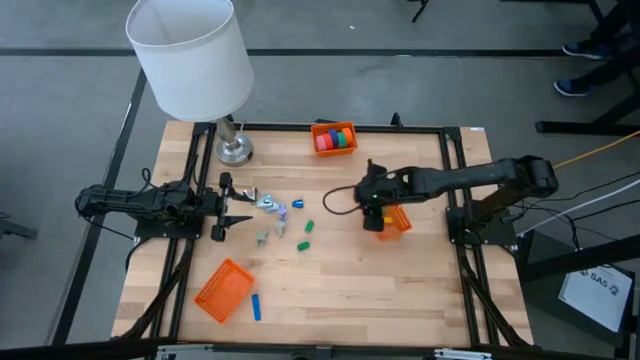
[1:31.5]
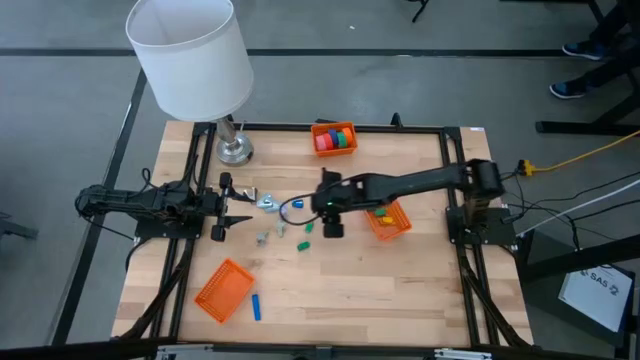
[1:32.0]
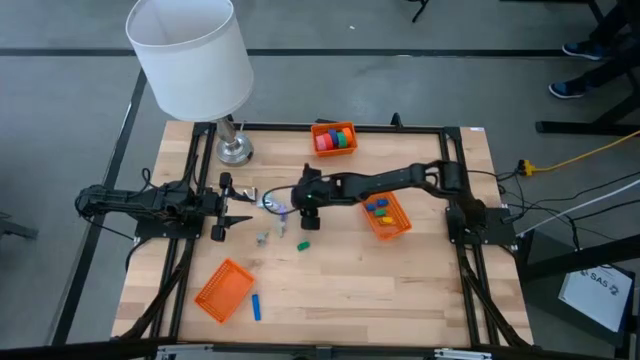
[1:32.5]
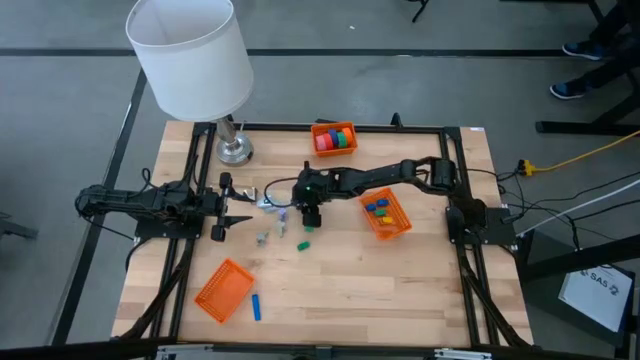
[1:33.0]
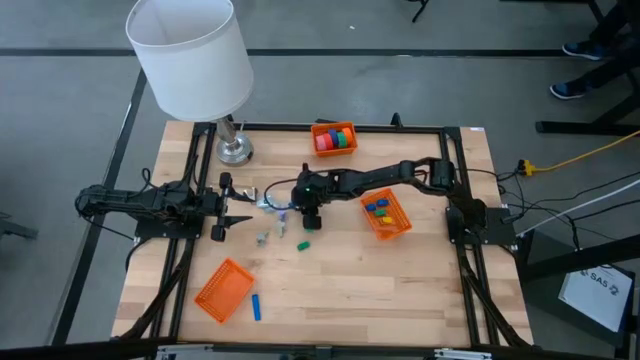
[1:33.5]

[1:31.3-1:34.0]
Task: Pick and place Stapler, Stapler remover, tape
Put the blue stapler into the middle orange bin

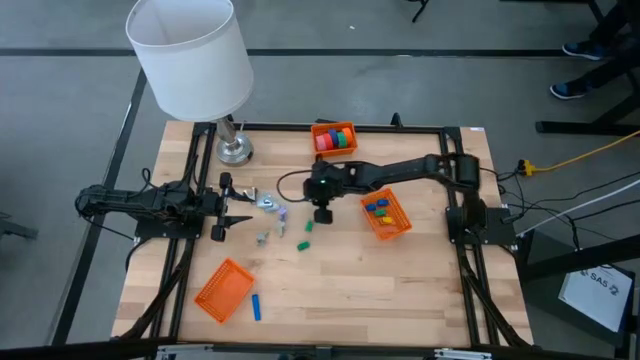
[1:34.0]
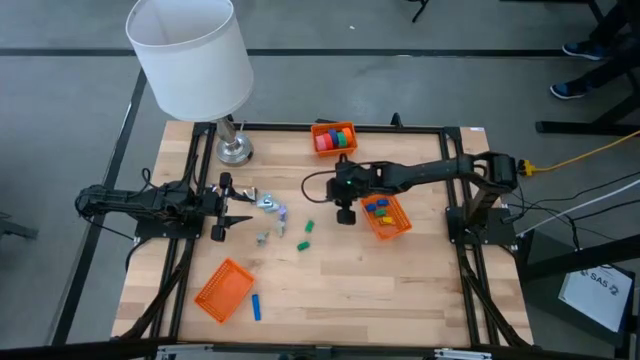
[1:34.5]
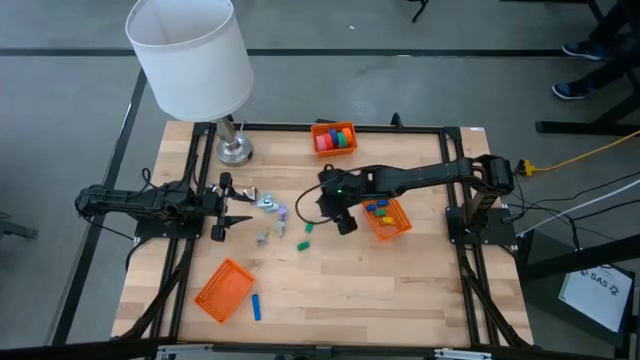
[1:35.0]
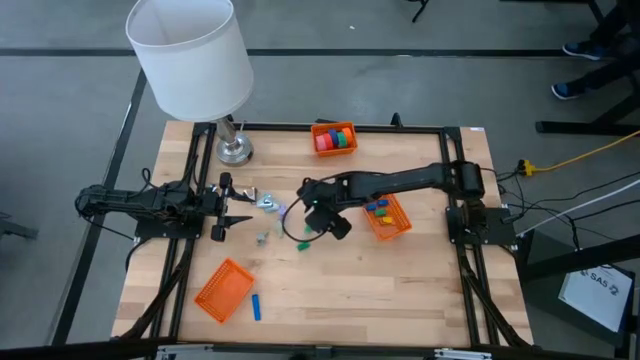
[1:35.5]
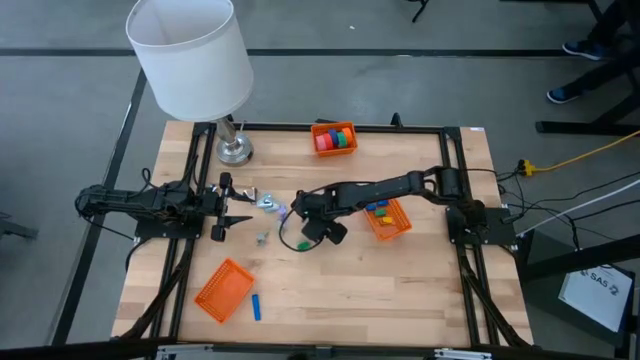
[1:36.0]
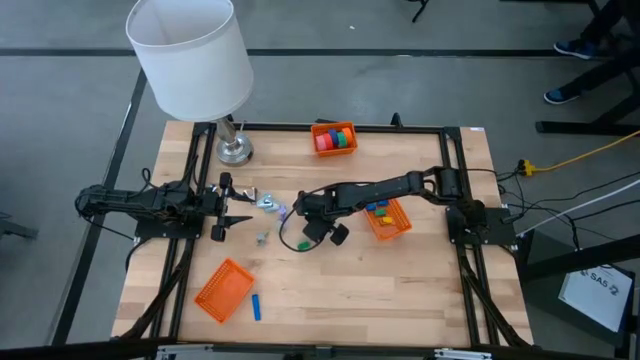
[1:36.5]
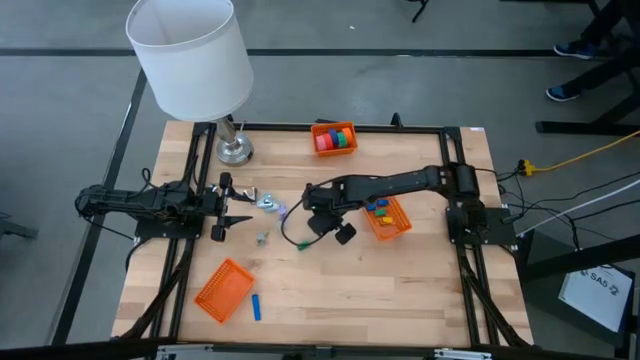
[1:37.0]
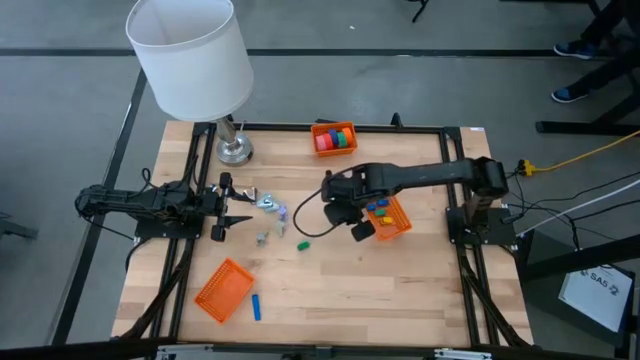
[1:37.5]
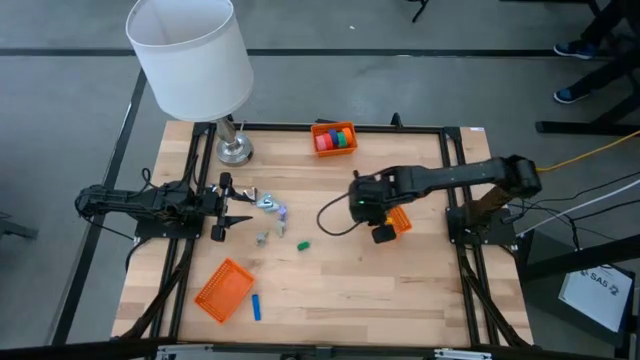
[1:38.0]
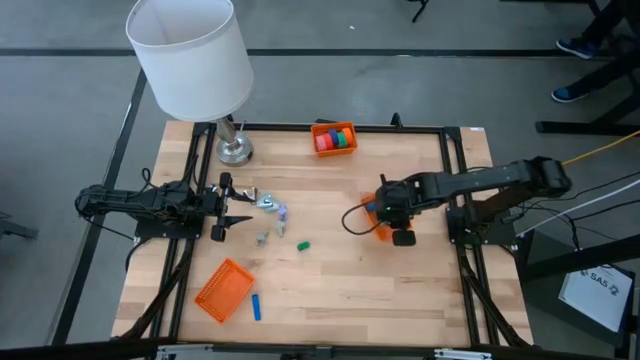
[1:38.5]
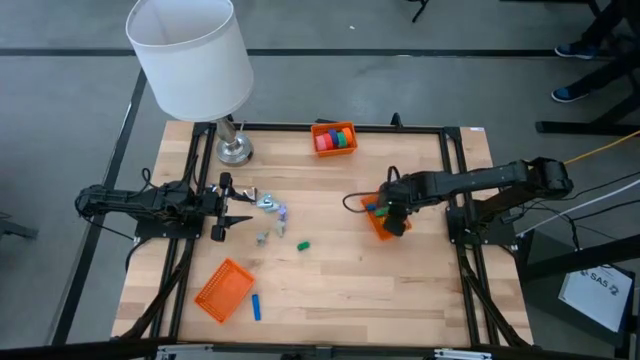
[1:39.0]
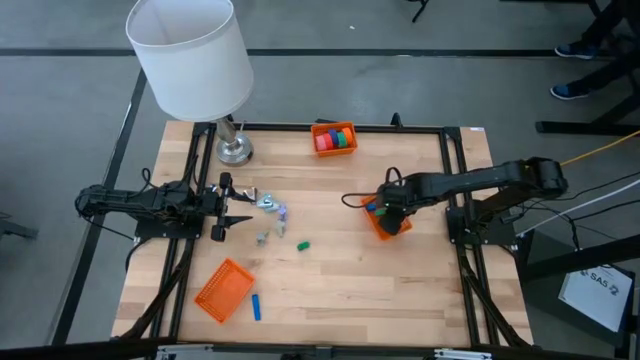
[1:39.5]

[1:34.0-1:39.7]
Put the green stapler into the middle orange bin

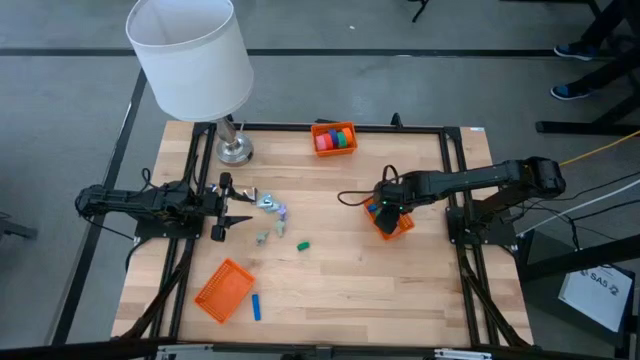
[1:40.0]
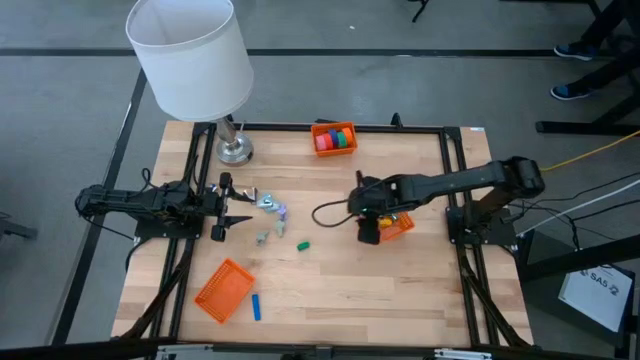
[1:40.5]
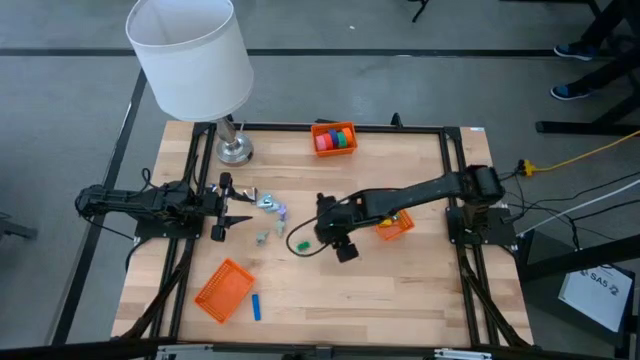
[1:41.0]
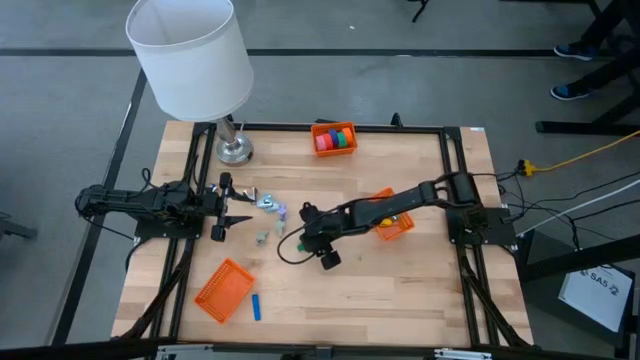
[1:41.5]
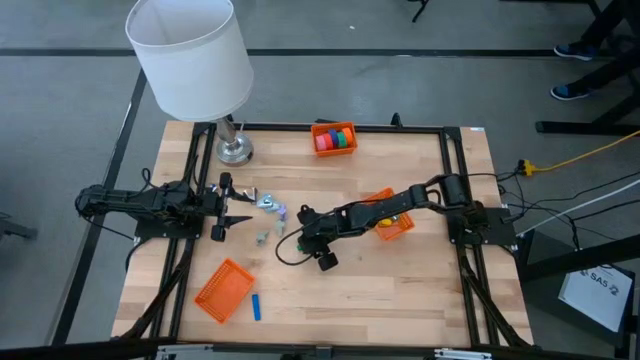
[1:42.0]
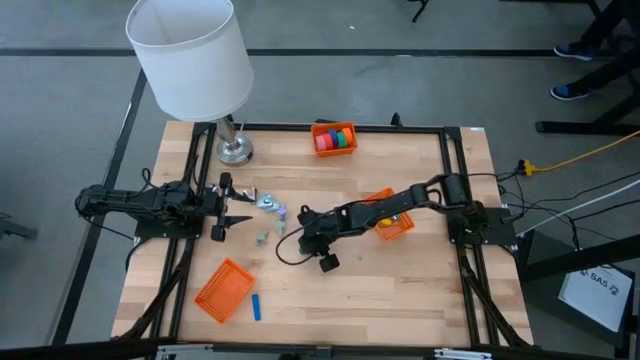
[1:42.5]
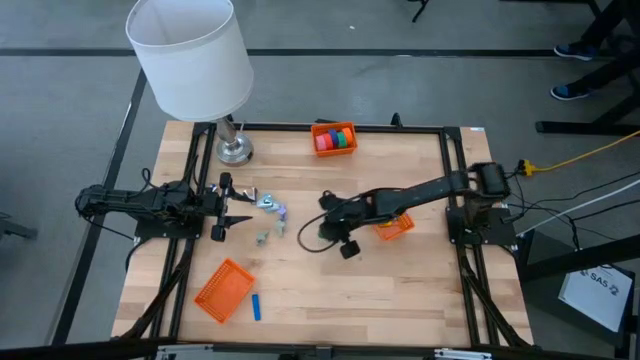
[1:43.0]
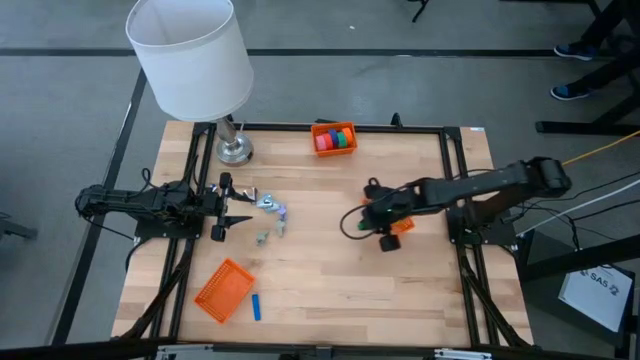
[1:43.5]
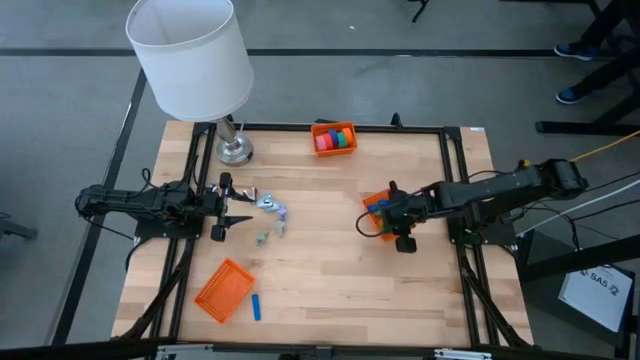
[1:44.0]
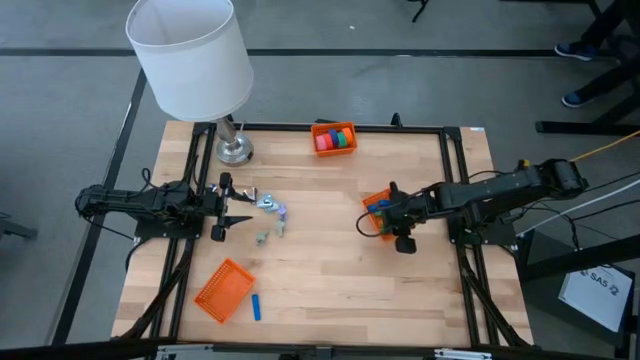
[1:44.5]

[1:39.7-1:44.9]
Put the blue stapler into the middle orange bin

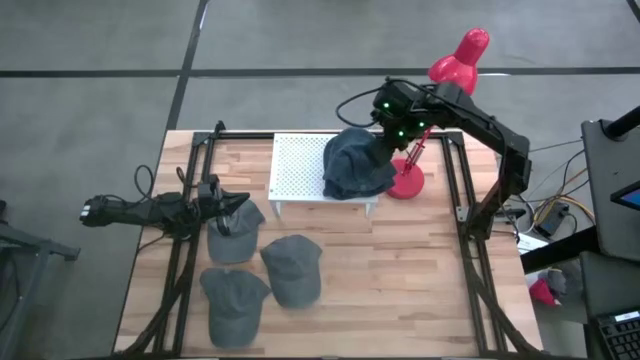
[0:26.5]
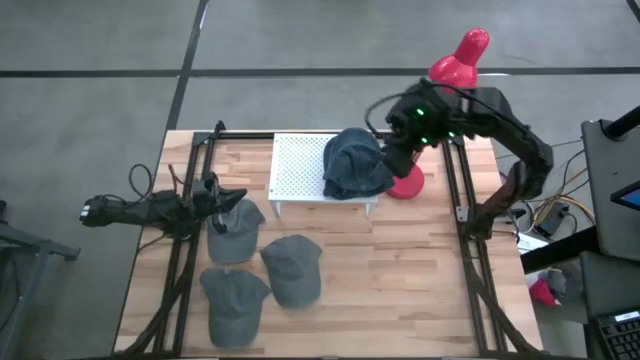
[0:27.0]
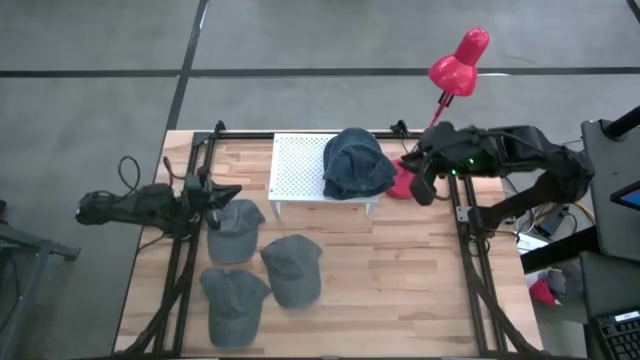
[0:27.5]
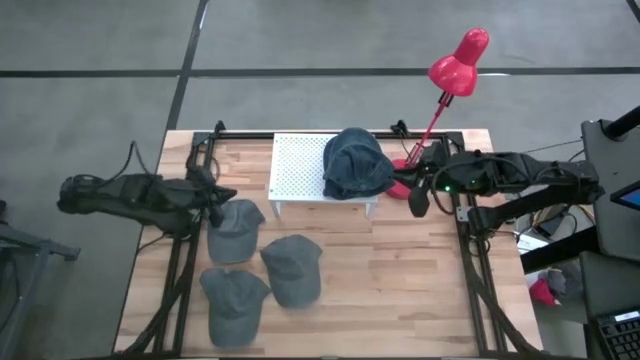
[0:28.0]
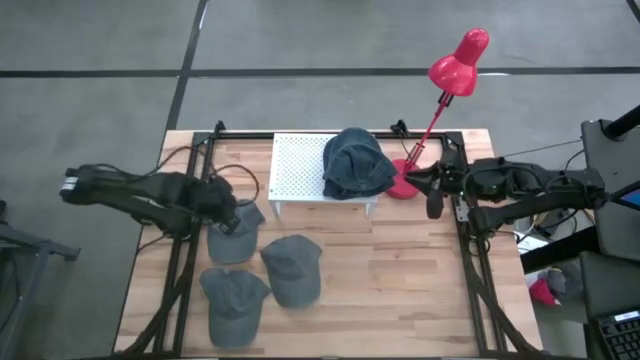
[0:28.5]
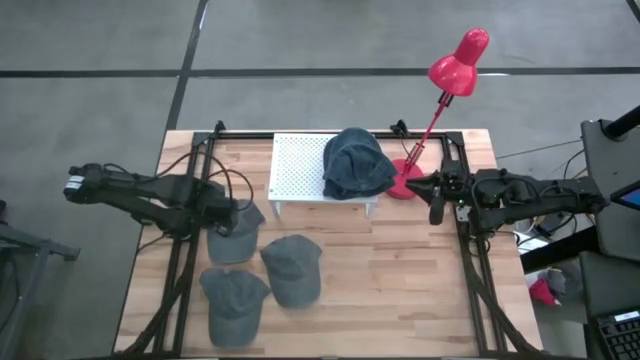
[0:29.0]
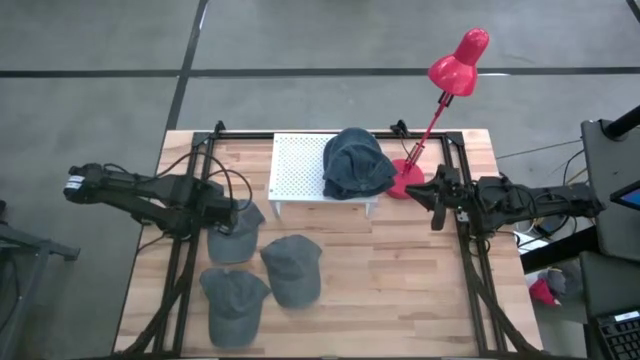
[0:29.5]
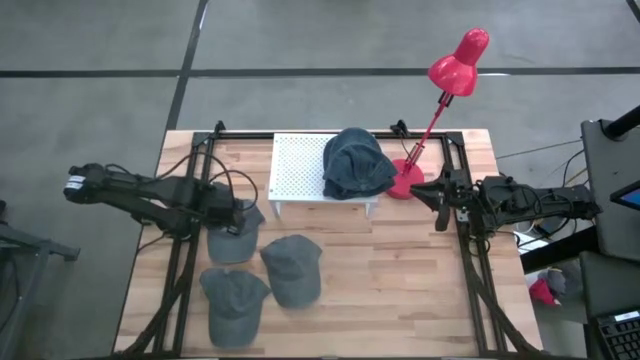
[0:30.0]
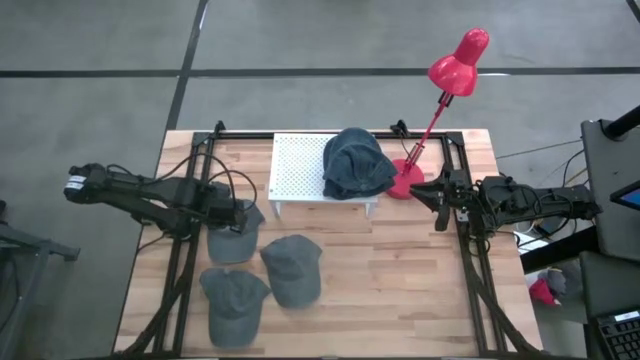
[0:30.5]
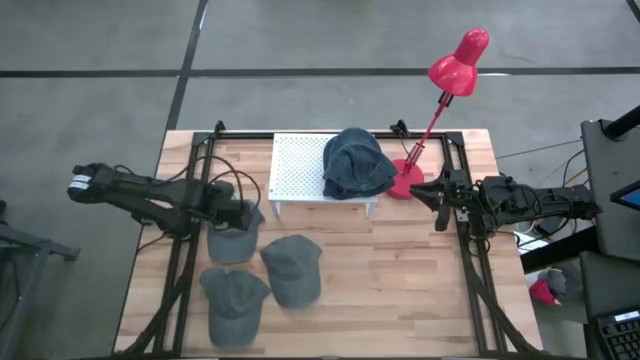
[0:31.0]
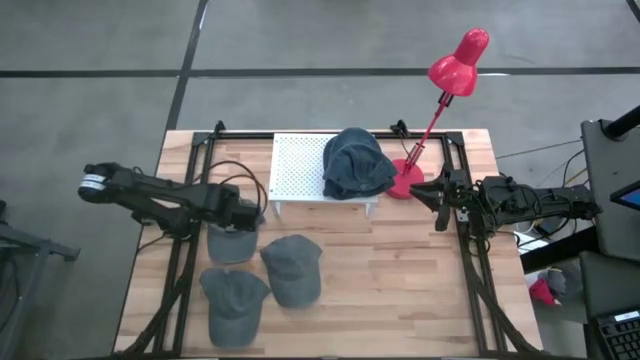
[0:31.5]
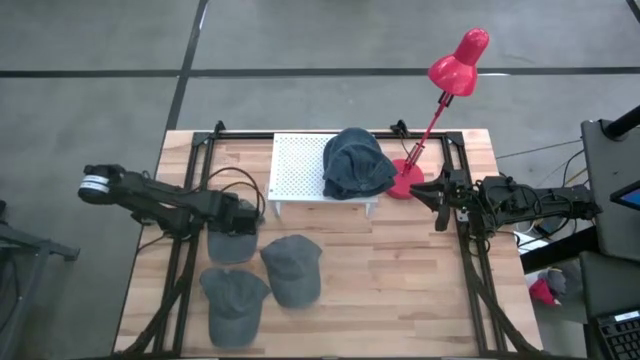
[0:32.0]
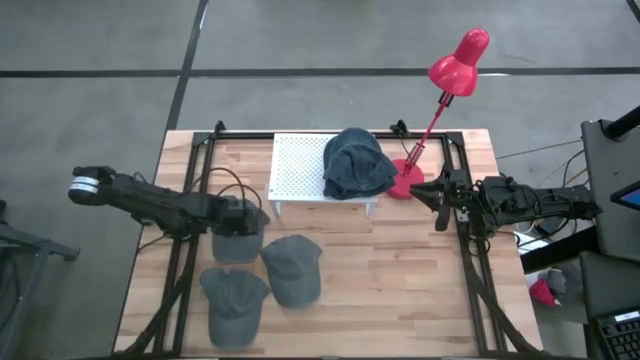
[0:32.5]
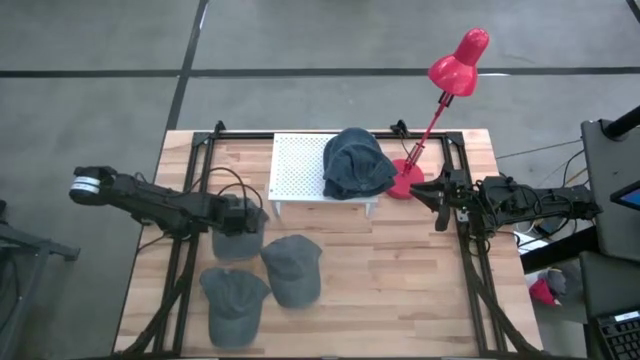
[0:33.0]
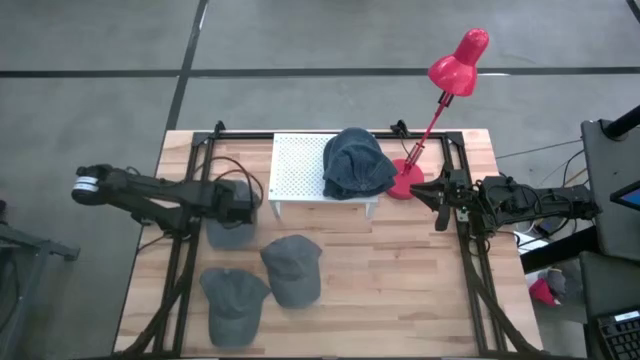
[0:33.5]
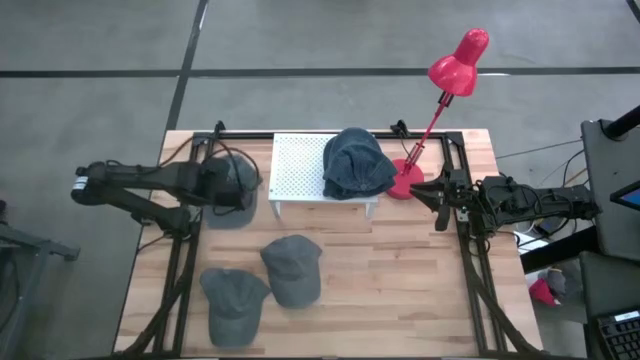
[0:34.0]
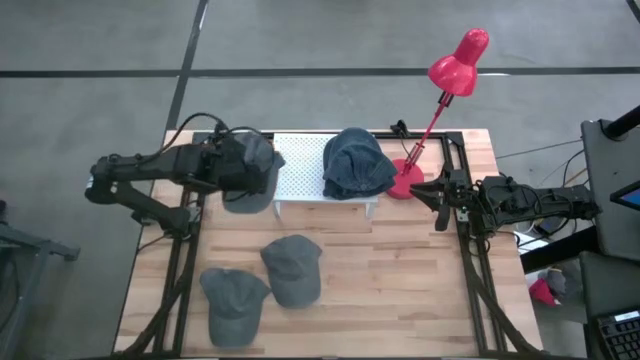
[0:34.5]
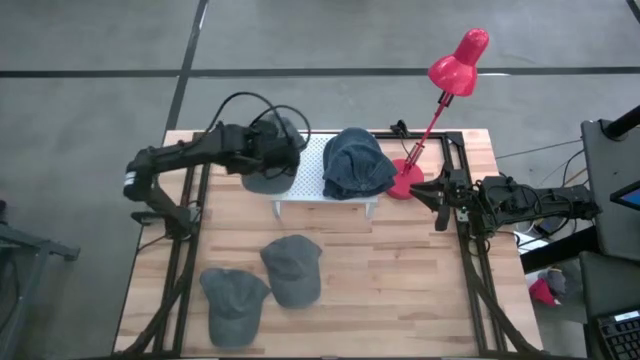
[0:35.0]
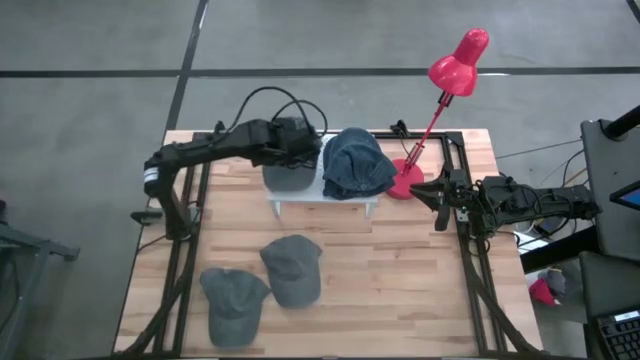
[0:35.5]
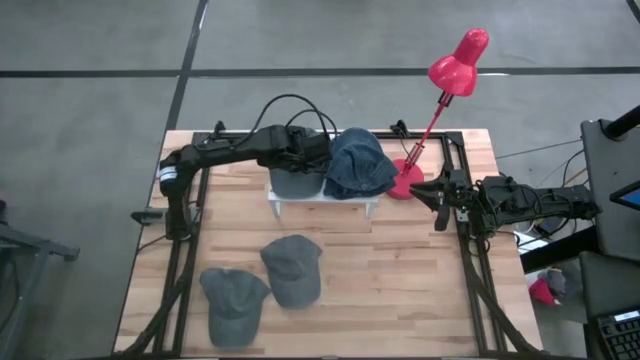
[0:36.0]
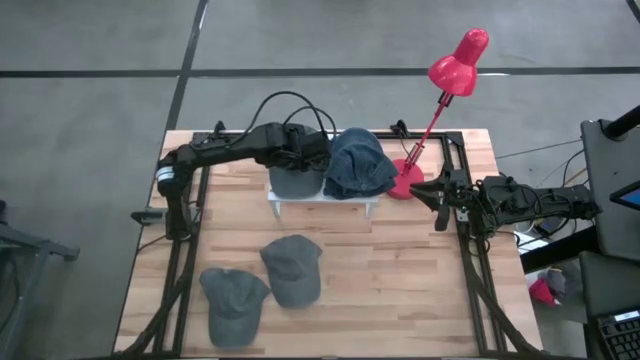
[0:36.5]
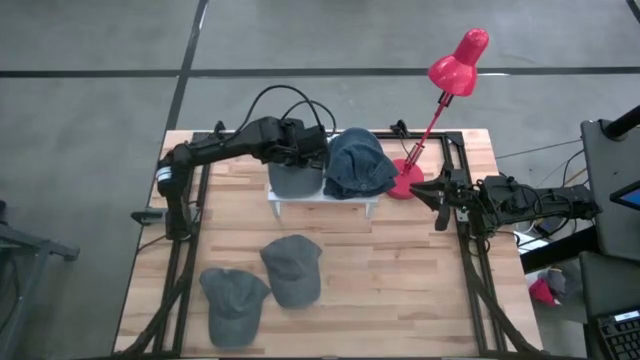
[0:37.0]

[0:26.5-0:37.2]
Task: Pick & Place hat
Put the gray cap on the shelf
